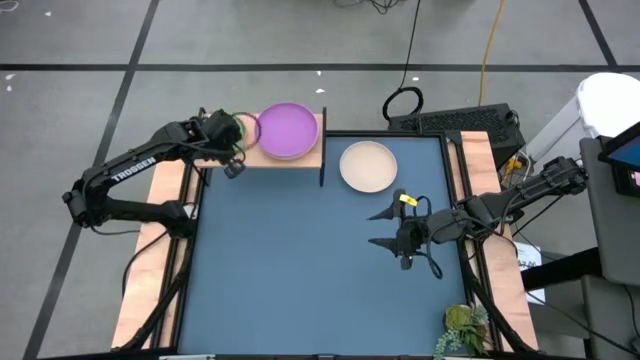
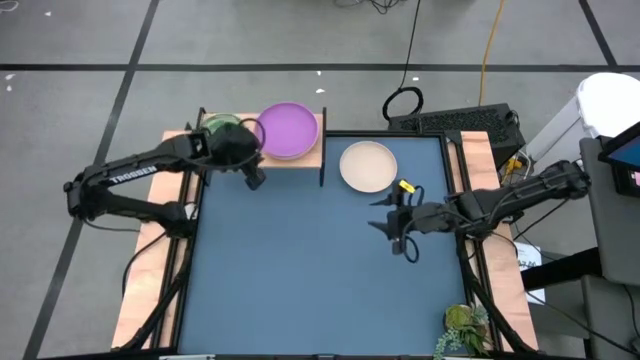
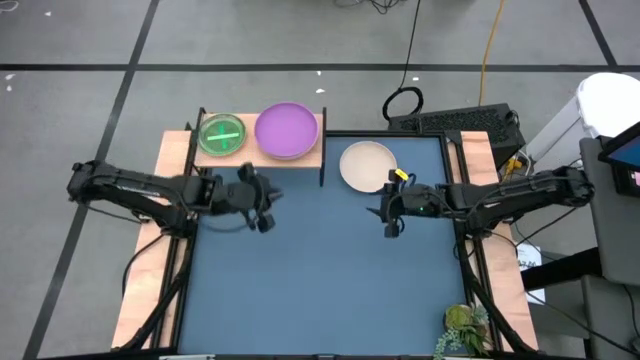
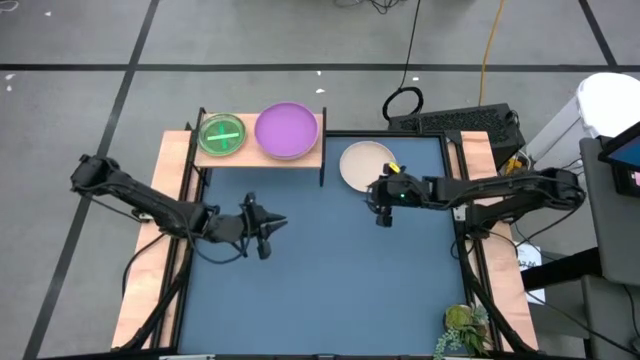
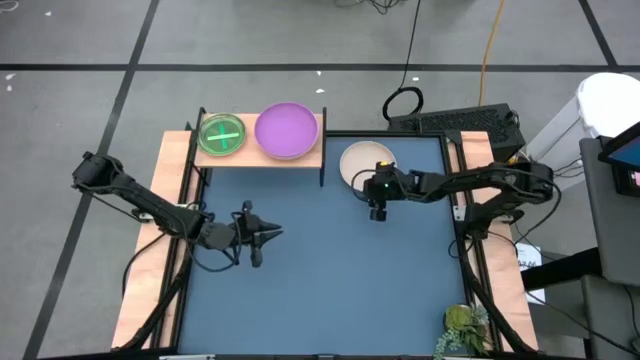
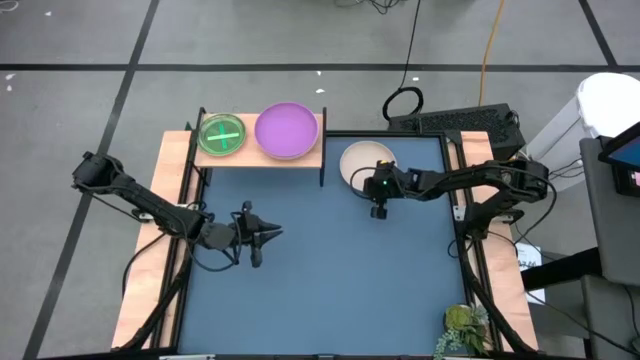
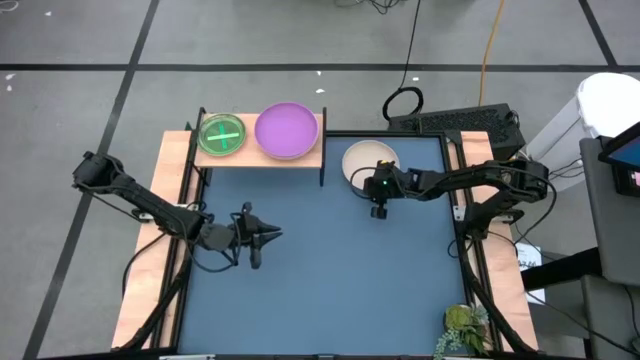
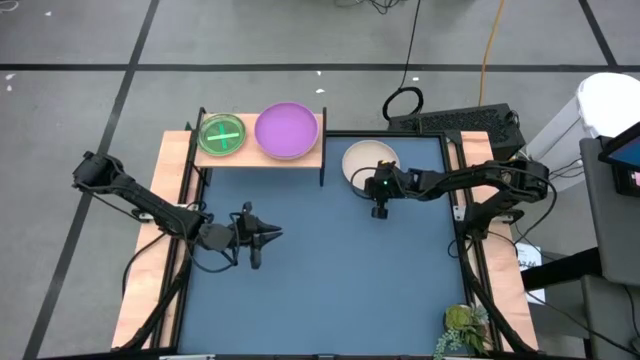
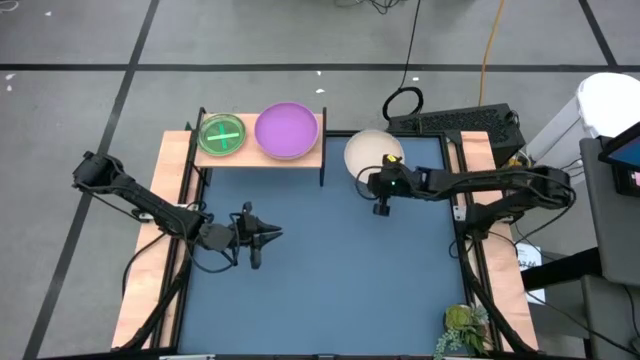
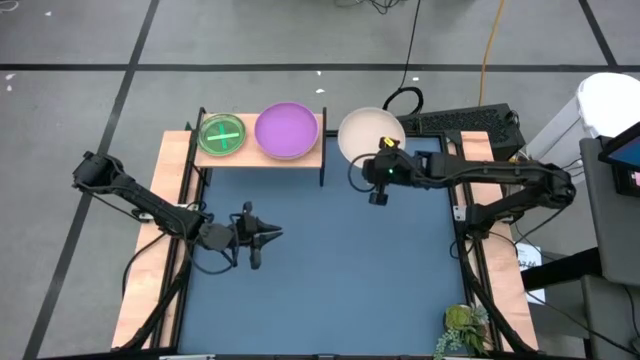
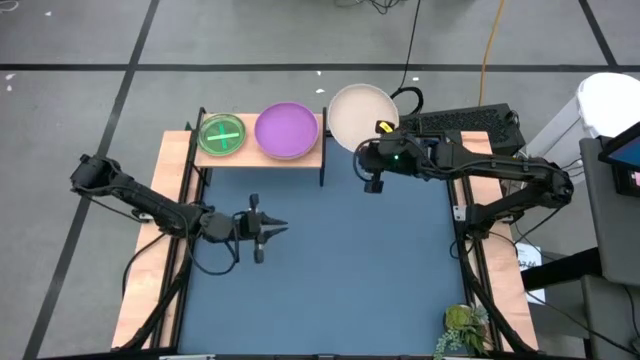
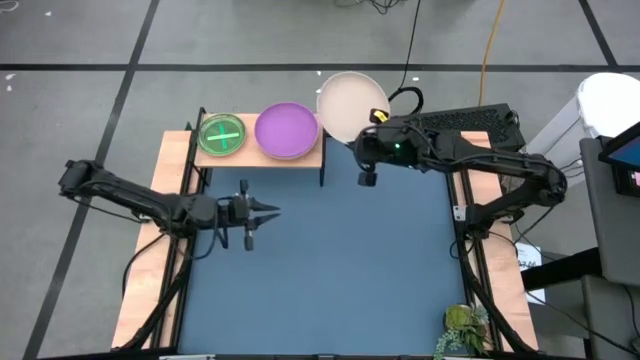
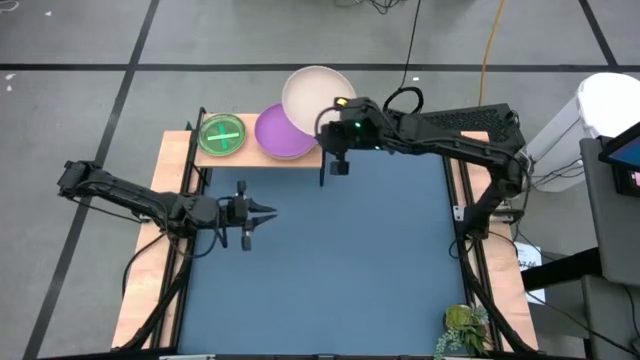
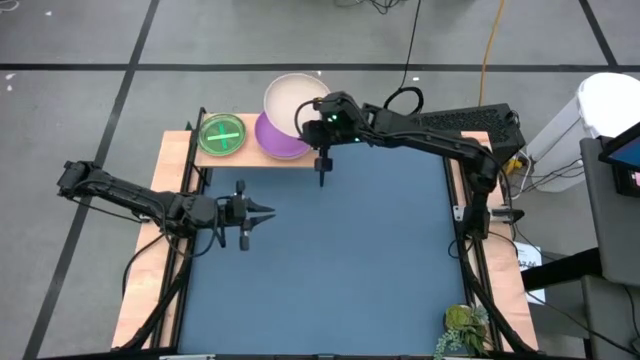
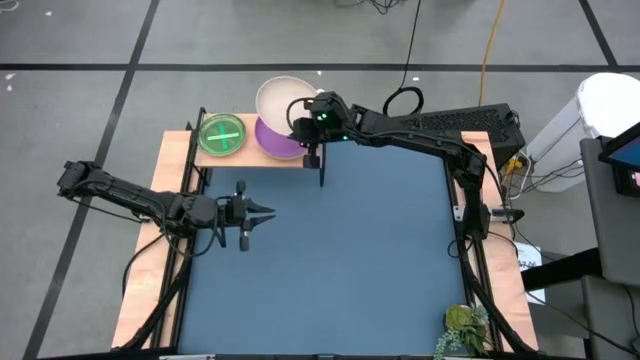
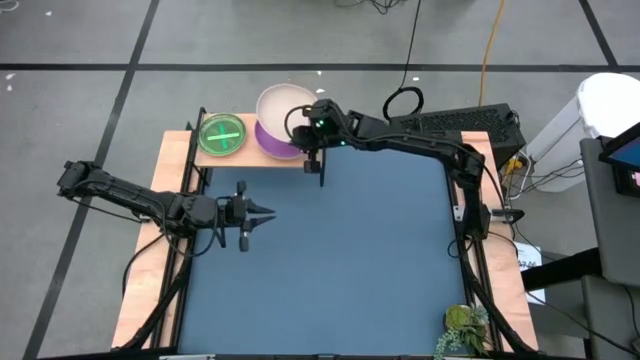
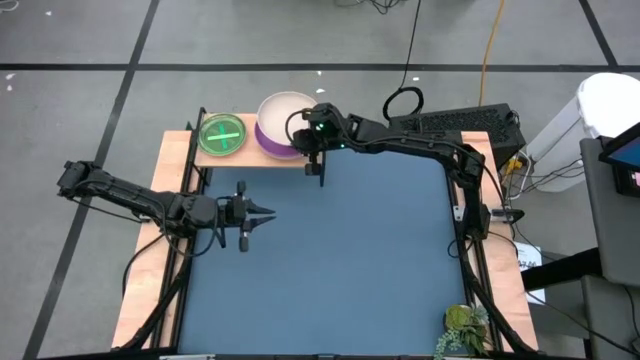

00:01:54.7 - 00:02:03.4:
Task: Place and stack plates onto a shelf
Stack the white plate on top the dark pink plate on the shelf

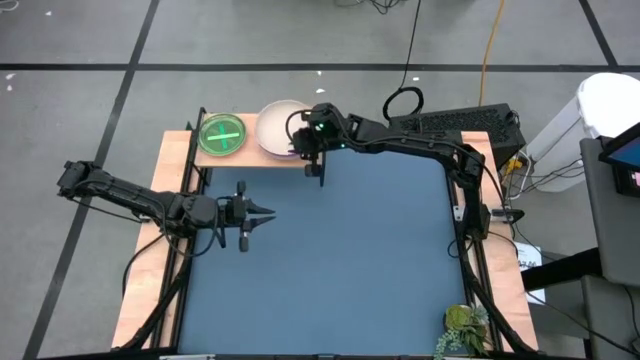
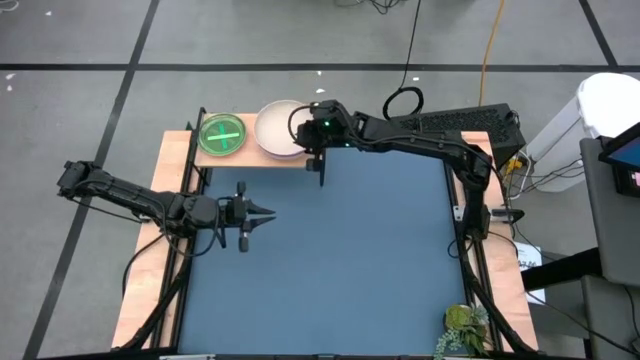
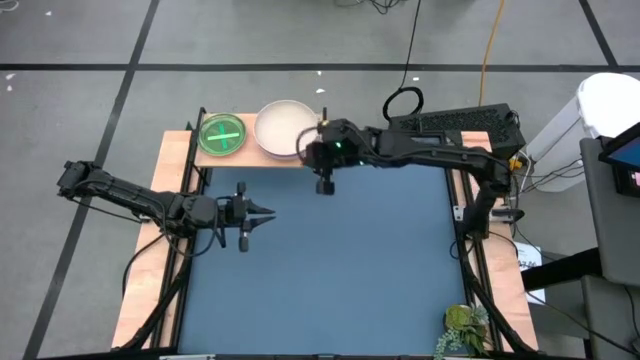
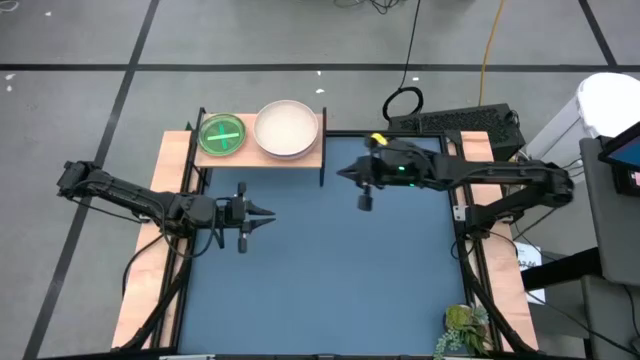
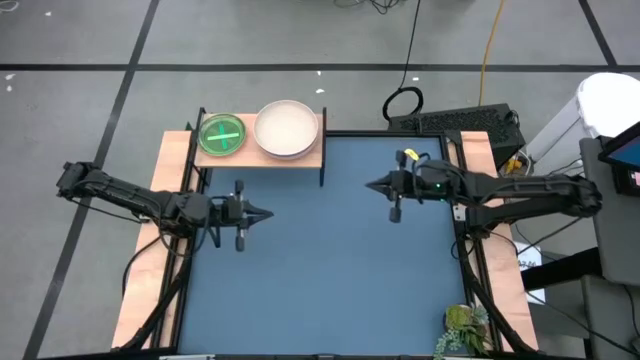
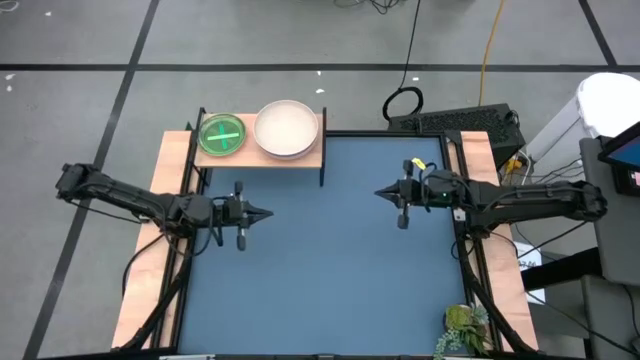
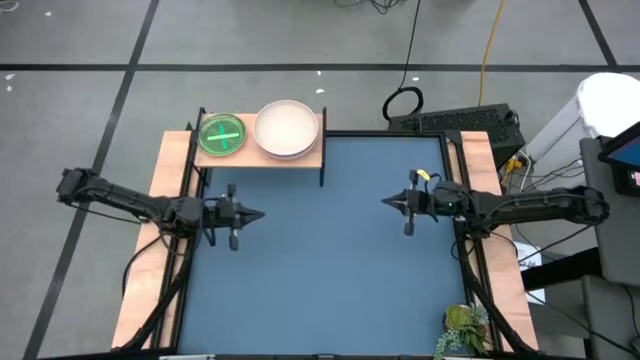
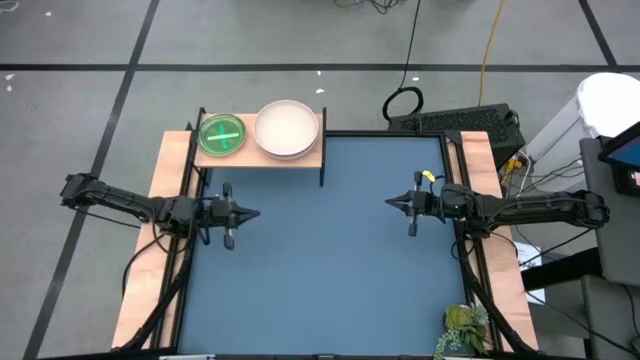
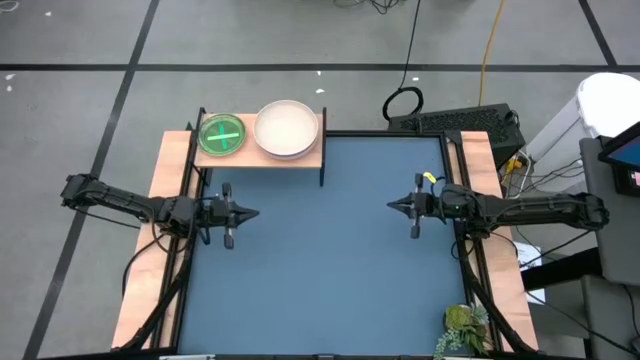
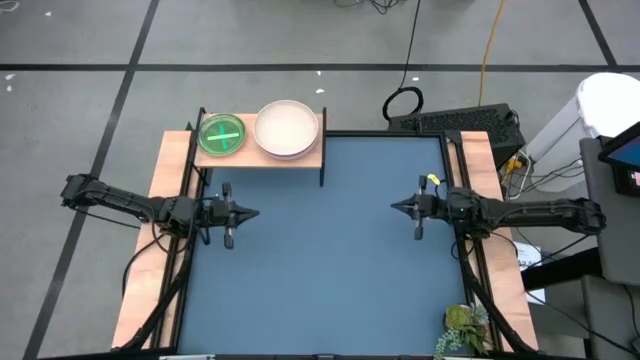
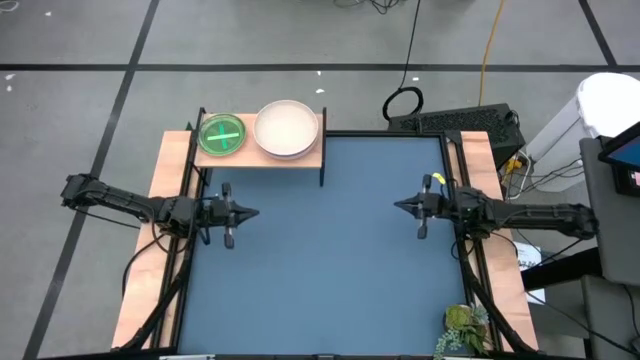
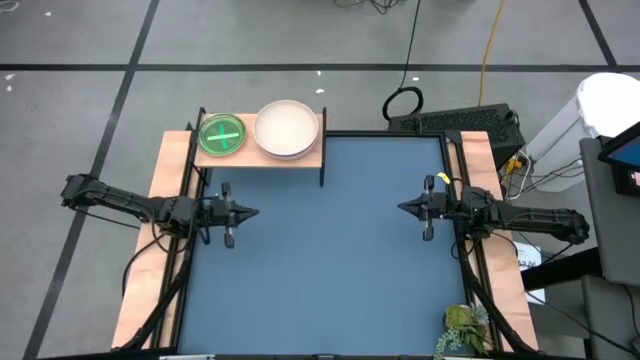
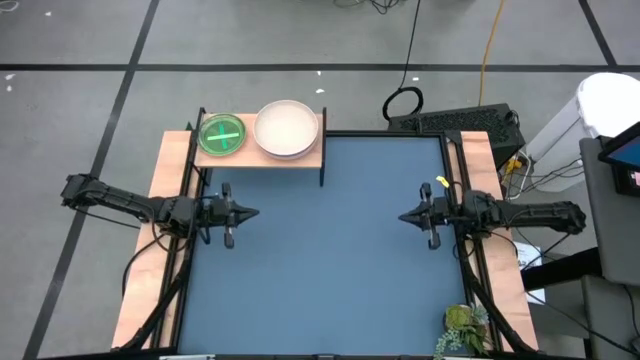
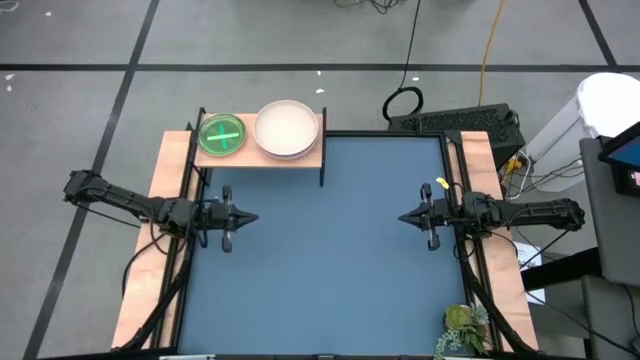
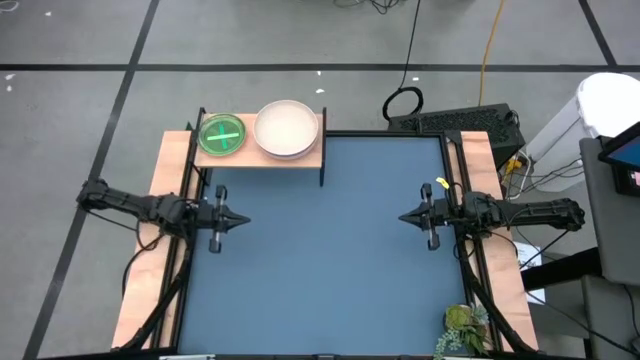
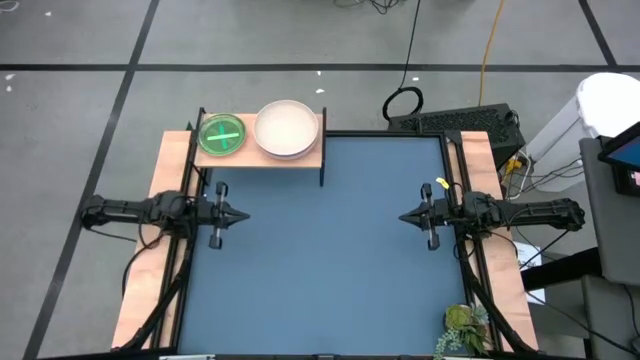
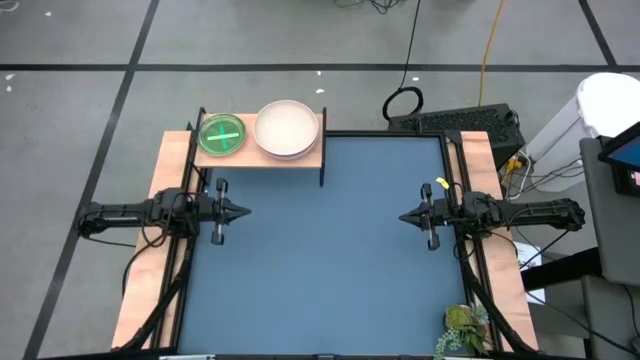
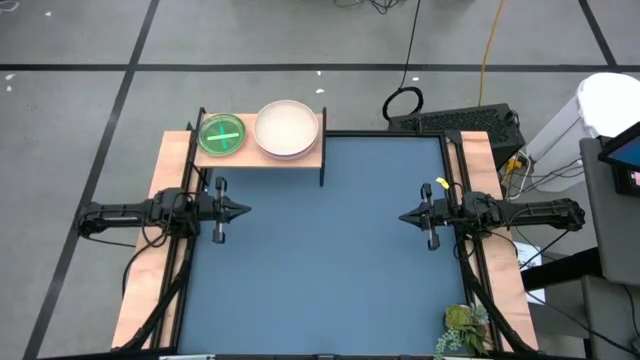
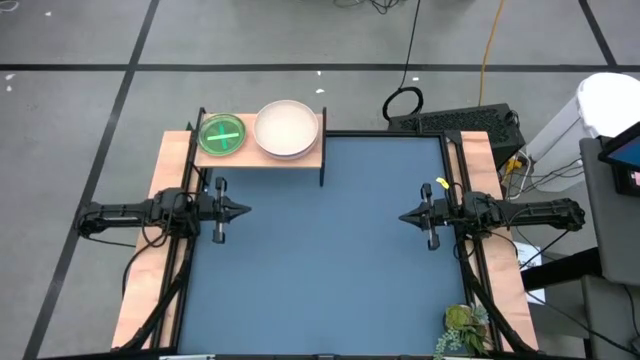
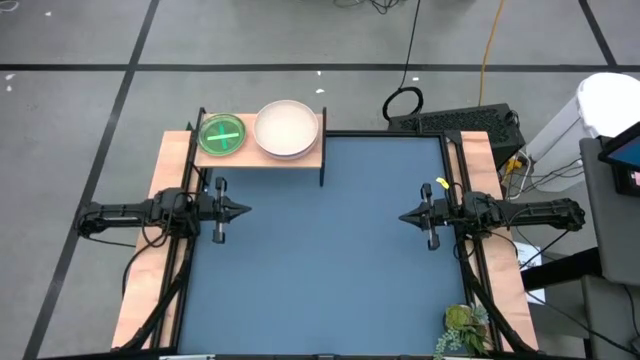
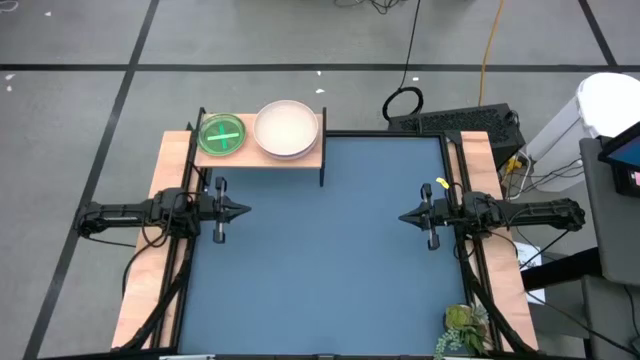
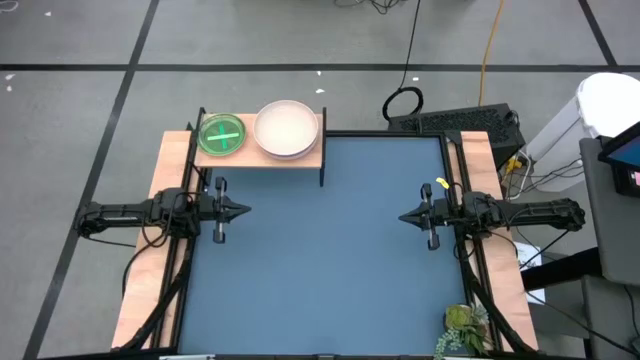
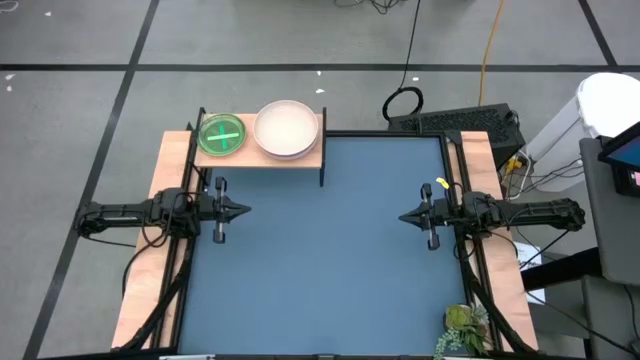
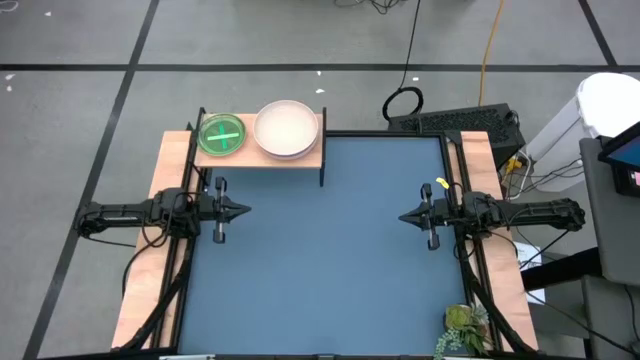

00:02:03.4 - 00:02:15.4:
Return to Home Position

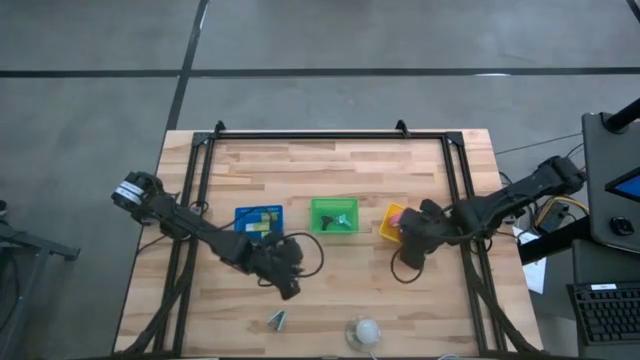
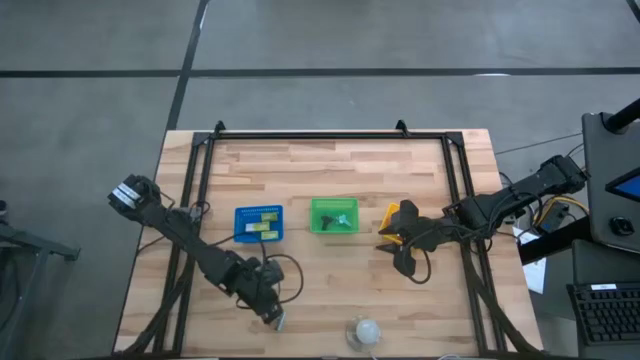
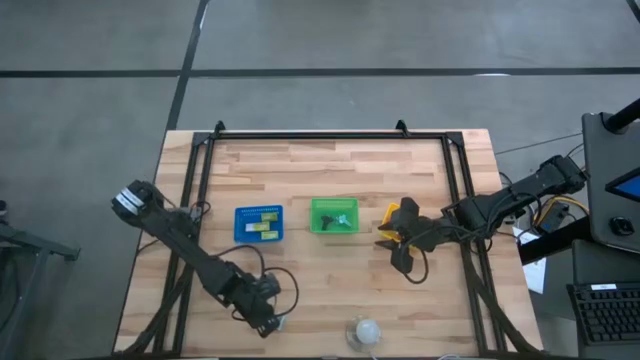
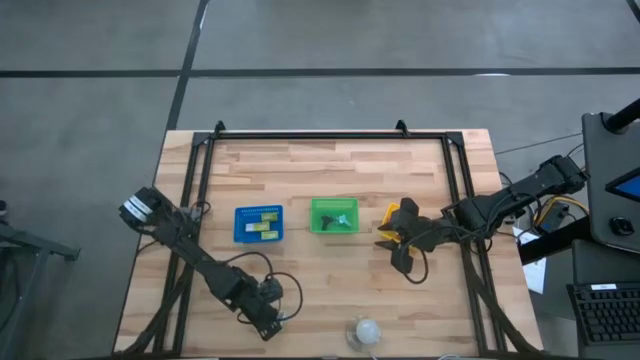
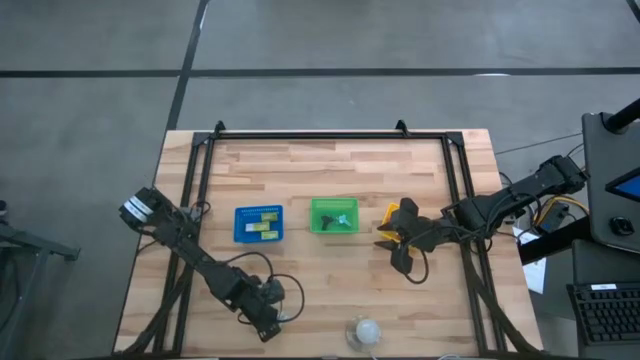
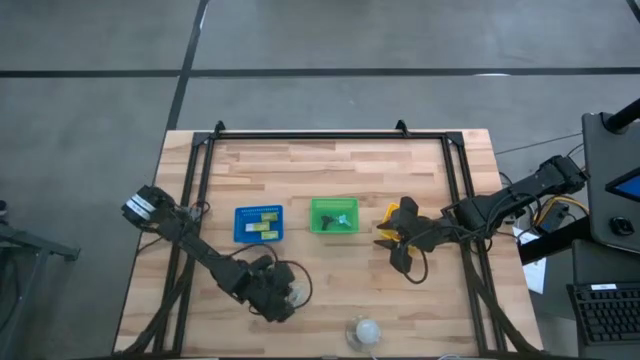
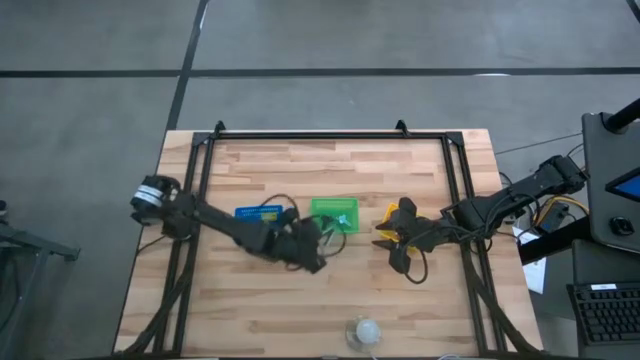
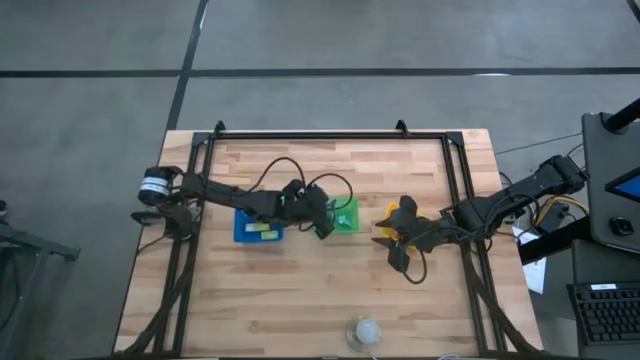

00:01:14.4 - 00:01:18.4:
Task: Pick and place Stapler, Stapler remover, tape
Put the light blue staple remover into the green bin
